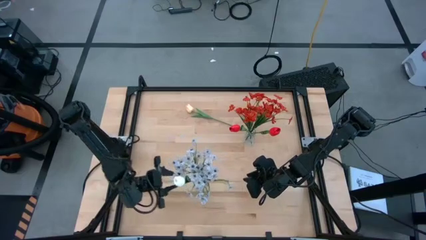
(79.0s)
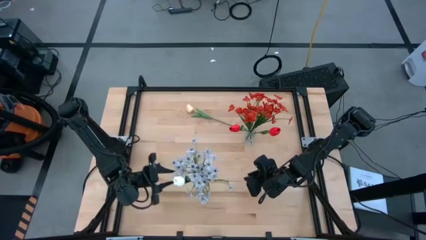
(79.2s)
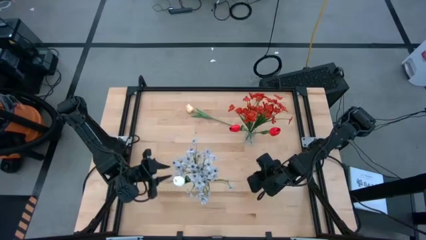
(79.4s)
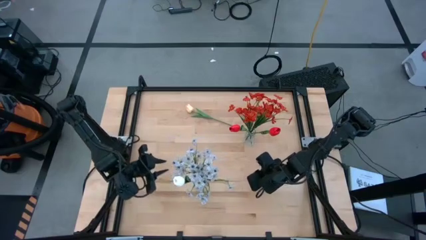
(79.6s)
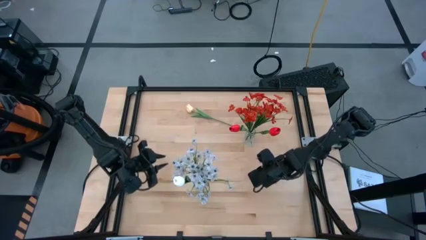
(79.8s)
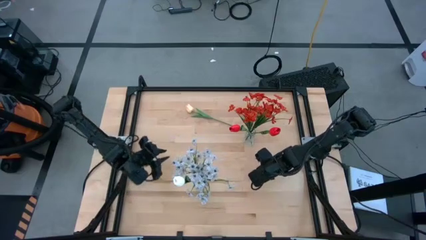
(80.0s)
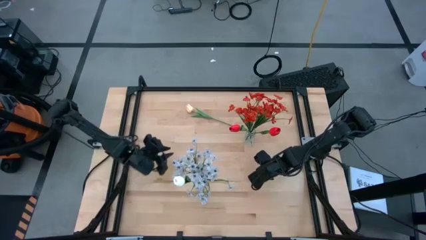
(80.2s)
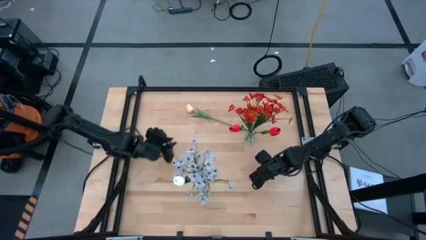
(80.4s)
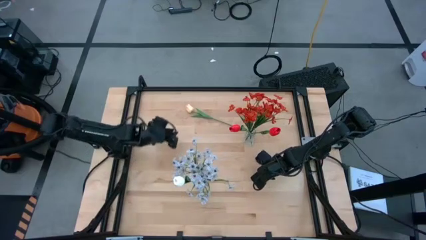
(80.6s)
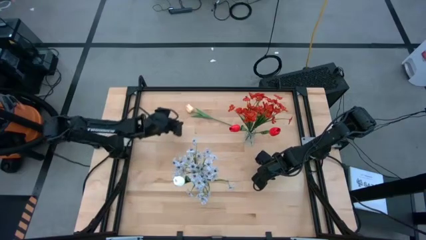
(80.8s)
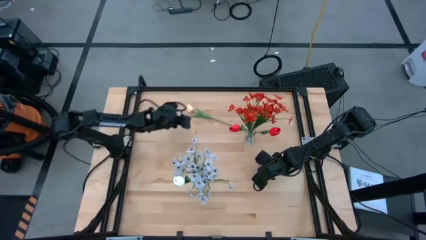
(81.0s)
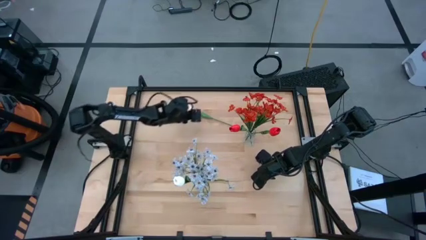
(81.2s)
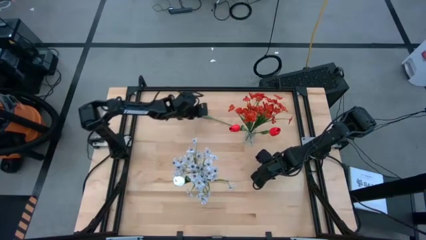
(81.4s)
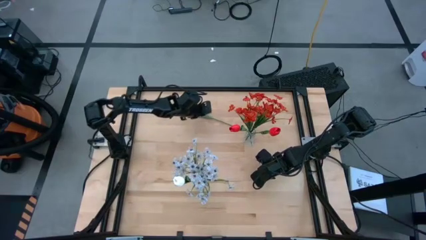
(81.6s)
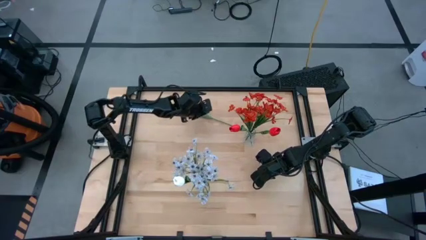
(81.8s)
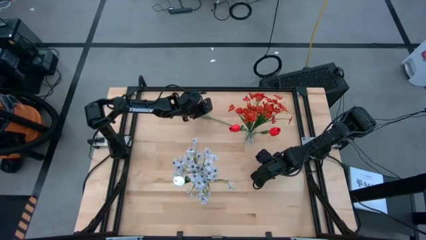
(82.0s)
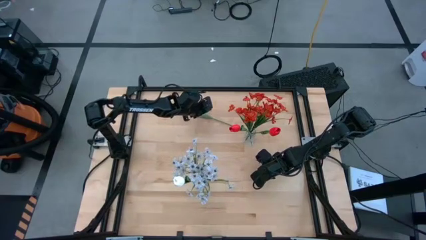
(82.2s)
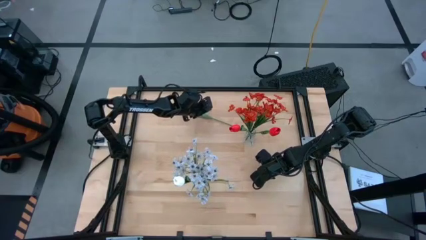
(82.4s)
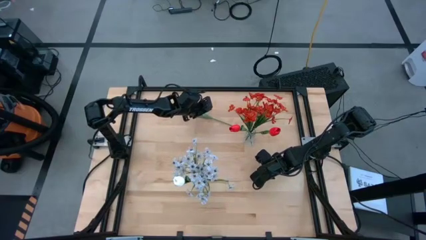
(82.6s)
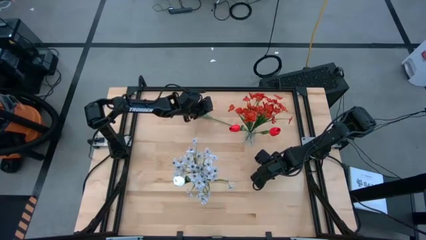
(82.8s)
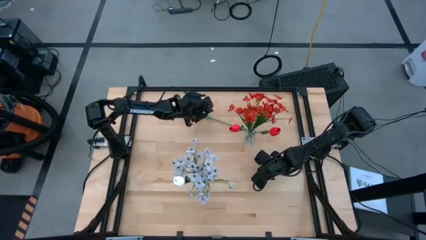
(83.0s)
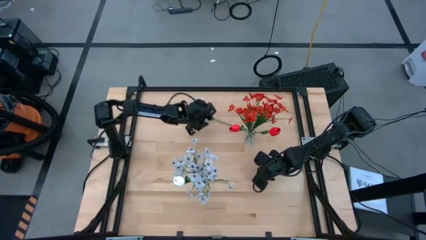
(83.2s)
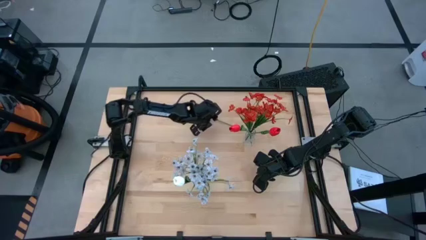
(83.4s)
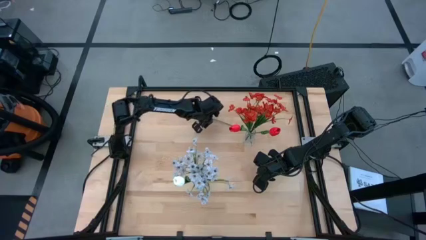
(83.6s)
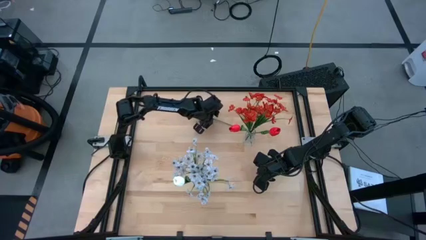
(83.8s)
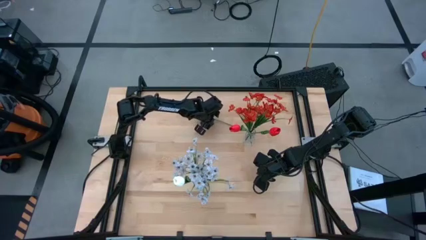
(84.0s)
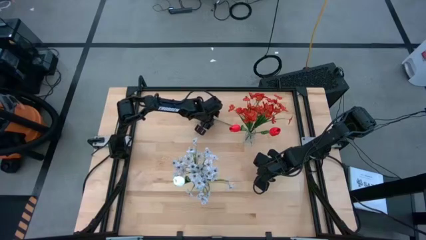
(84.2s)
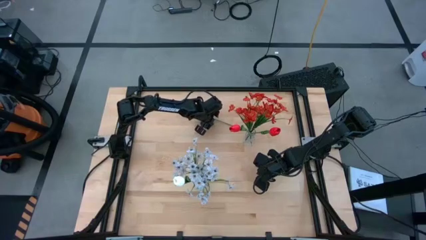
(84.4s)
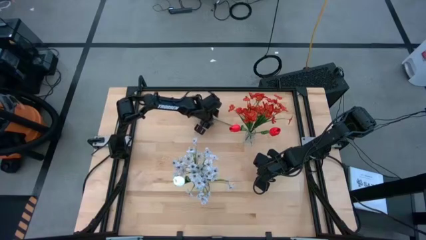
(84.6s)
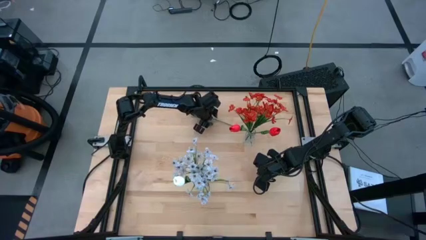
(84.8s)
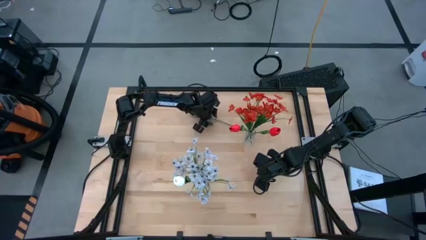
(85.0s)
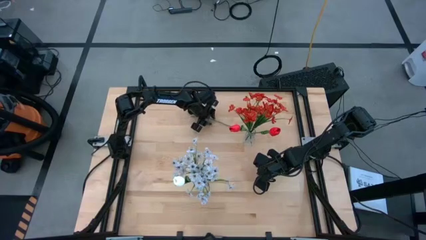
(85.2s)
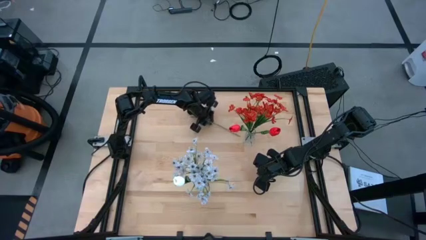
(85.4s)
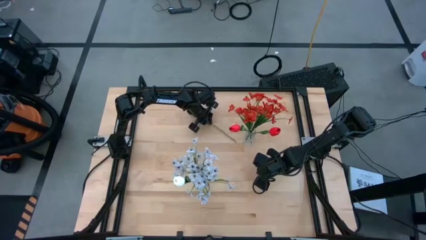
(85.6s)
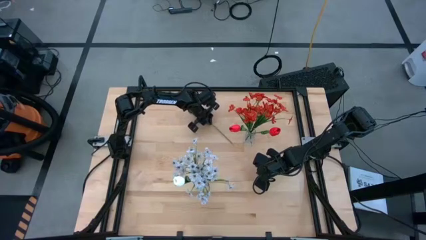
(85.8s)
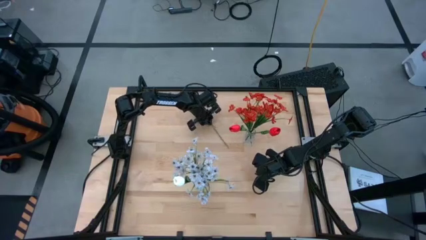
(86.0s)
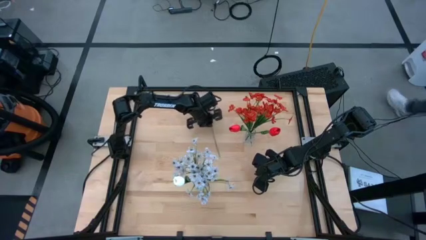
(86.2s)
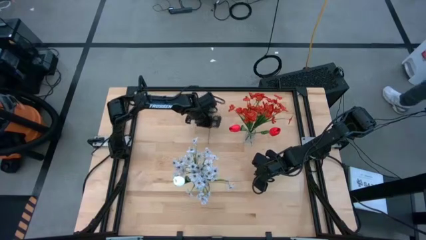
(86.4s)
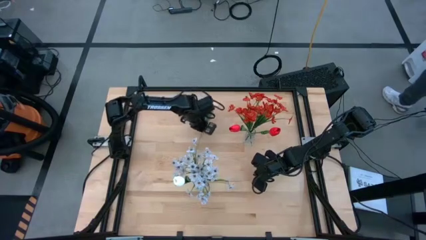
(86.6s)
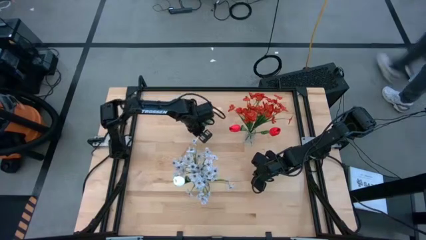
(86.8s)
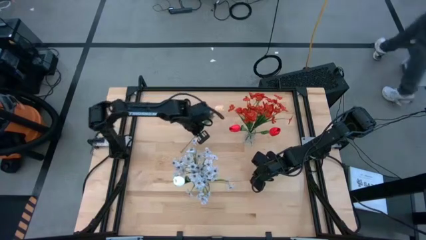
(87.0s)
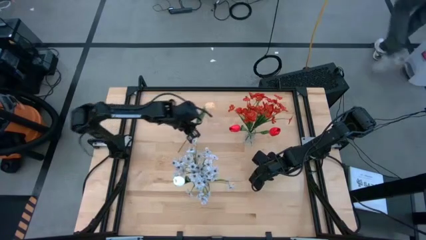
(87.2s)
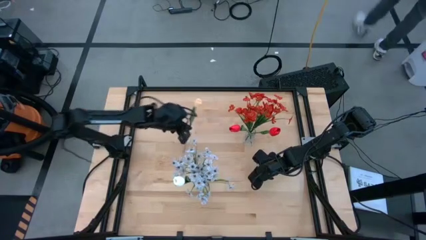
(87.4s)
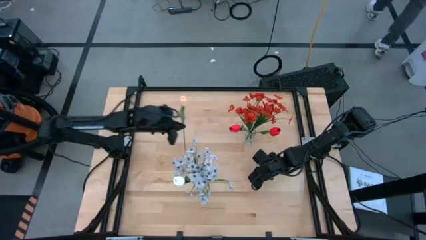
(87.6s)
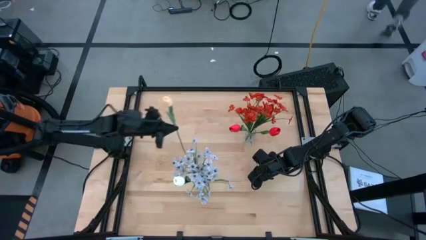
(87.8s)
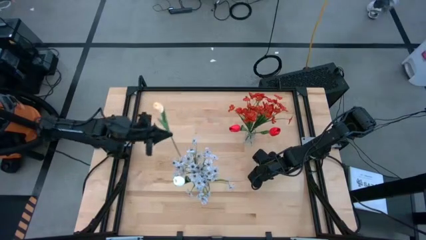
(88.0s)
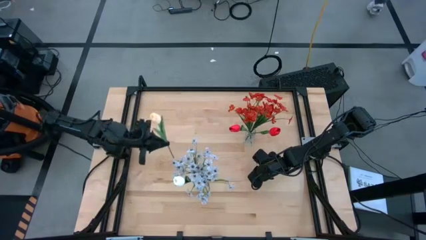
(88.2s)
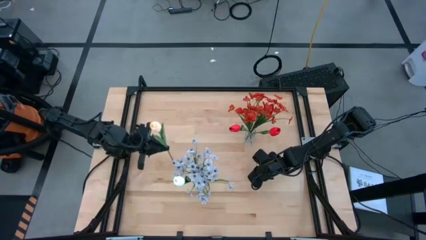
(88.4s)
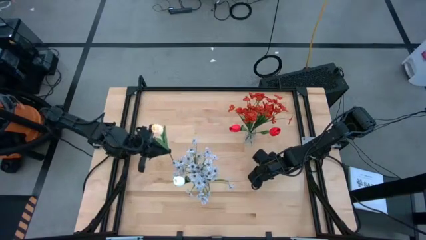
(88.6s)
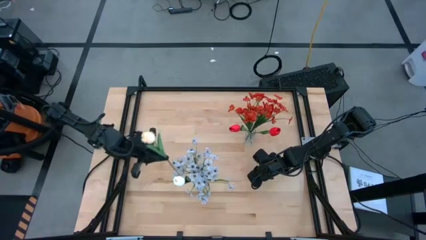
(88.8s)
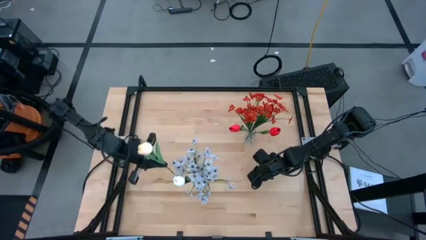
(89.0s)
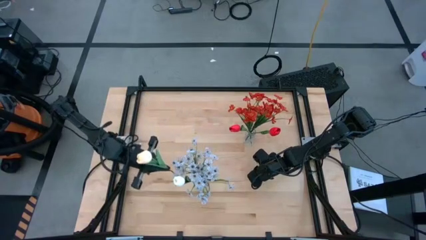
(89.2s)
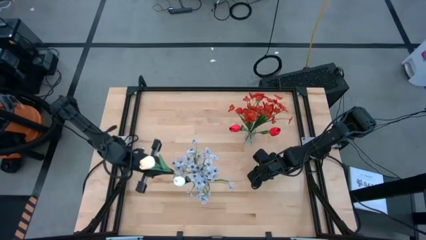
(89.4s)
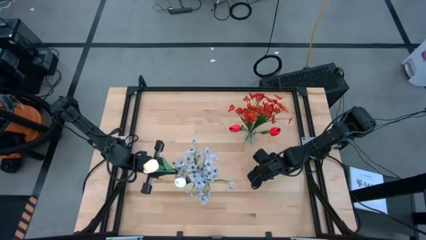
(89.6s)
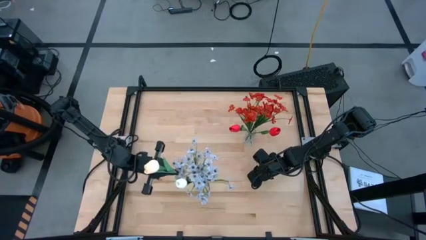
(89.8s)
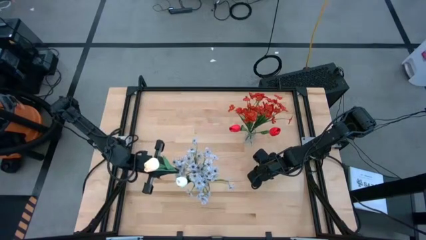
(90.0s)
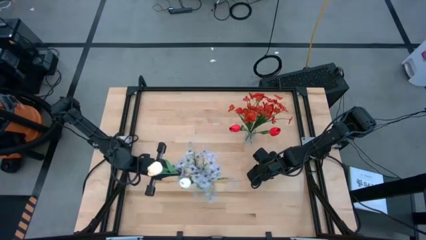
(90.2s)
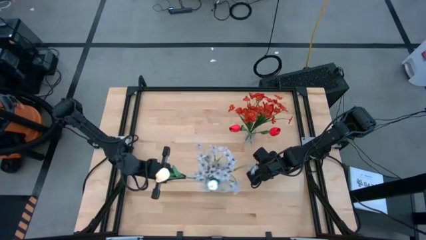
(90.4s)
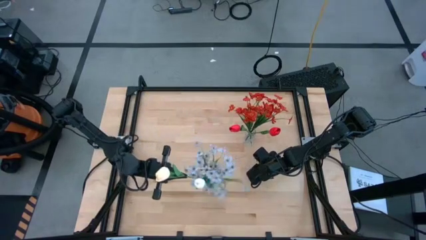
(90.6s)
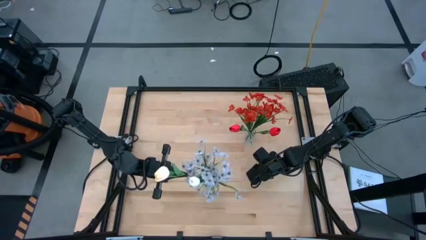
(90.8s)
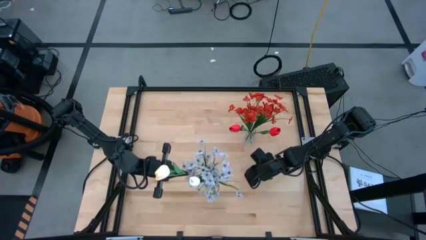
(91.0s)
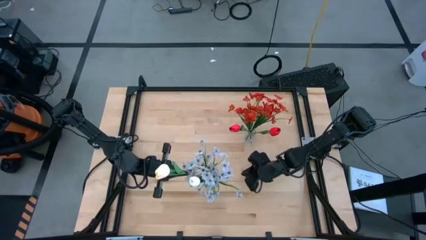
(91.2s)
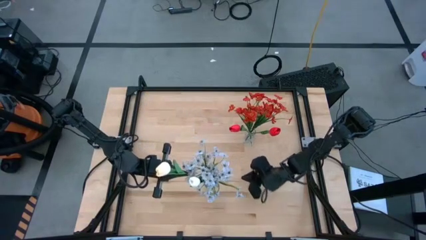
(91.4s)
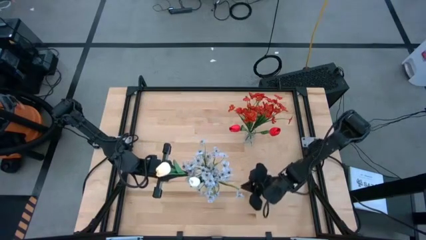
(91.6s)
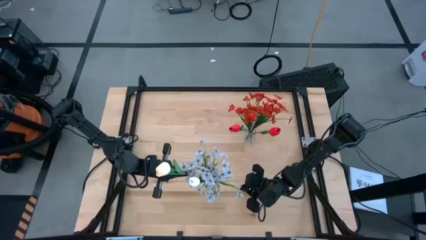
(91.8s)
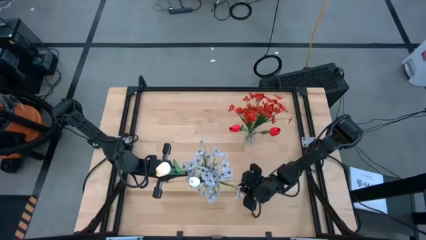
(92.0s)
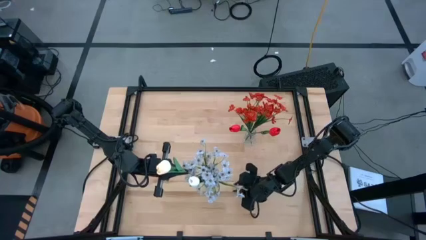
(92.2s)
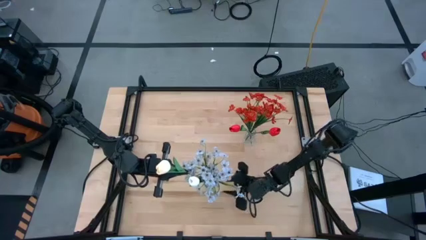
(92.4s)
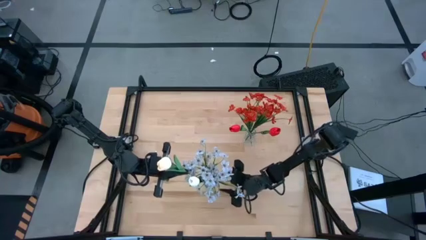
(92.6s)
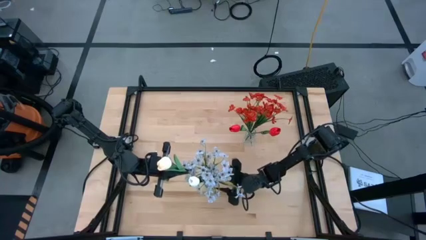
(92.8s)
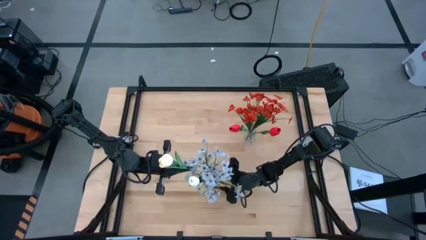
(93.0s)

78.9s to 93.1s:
Task: Sort flowers into vase by color
Put the yellow flower into the blue flower vase

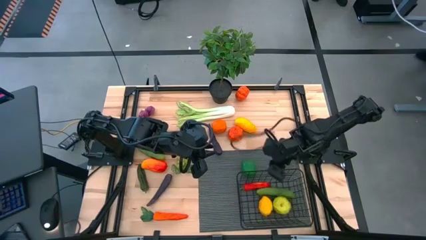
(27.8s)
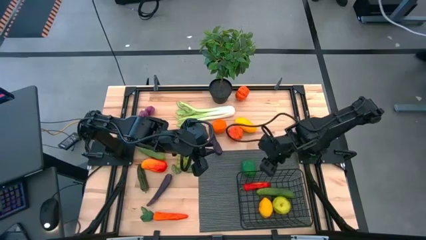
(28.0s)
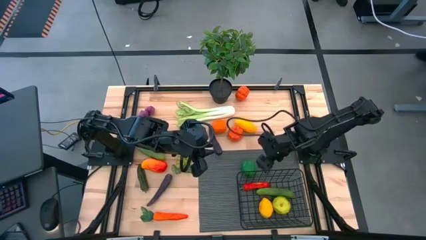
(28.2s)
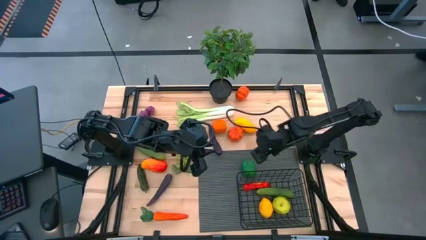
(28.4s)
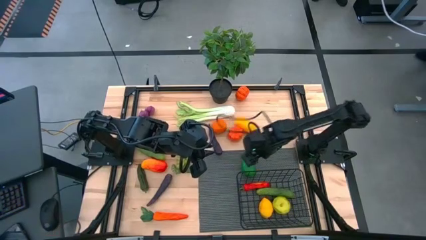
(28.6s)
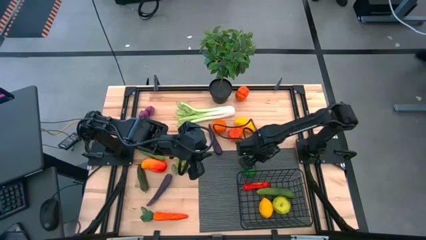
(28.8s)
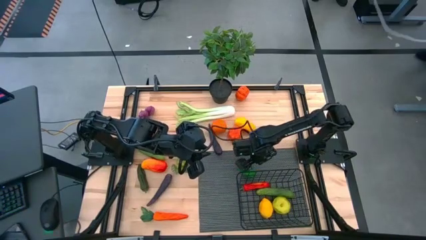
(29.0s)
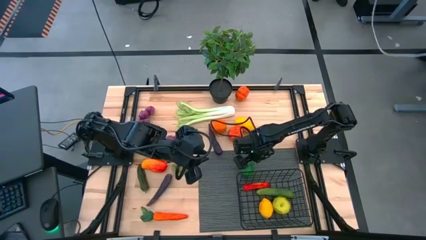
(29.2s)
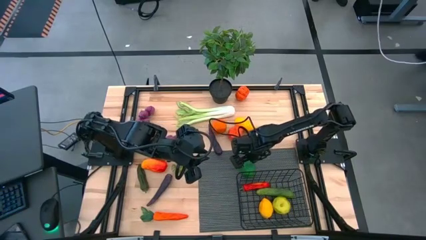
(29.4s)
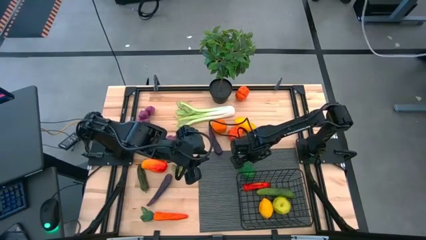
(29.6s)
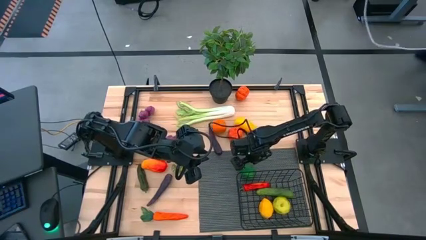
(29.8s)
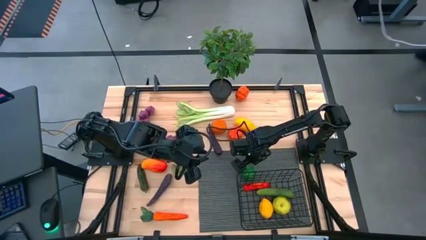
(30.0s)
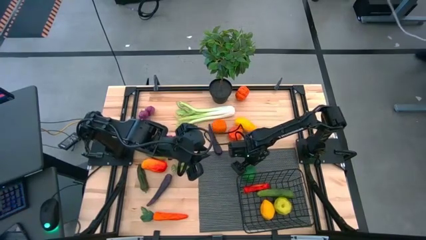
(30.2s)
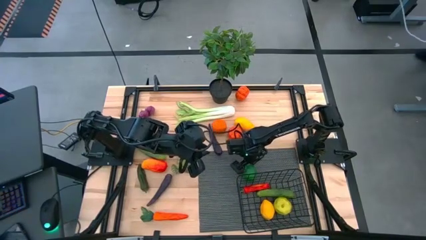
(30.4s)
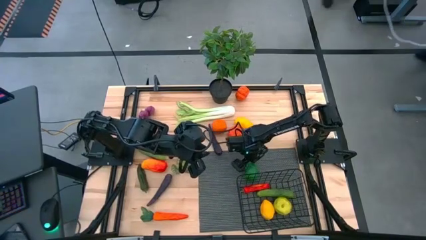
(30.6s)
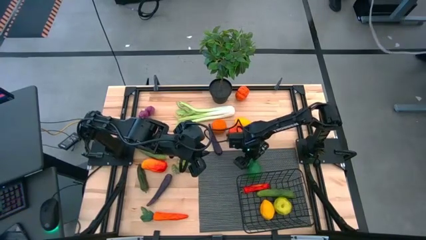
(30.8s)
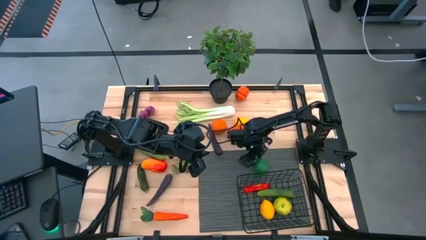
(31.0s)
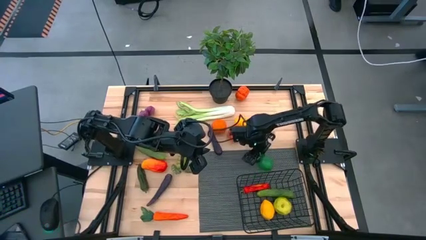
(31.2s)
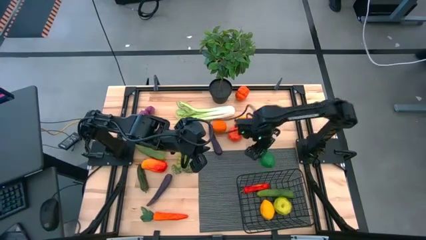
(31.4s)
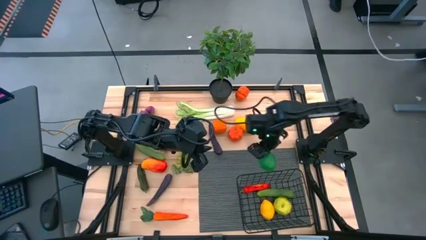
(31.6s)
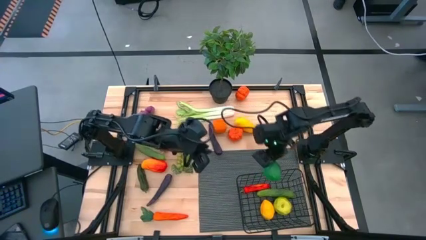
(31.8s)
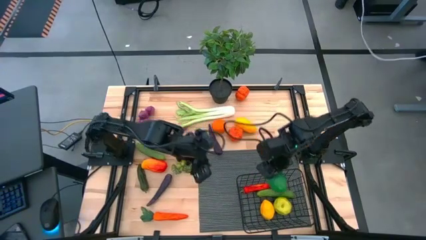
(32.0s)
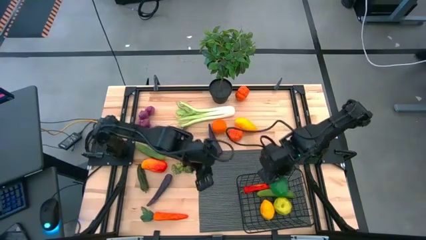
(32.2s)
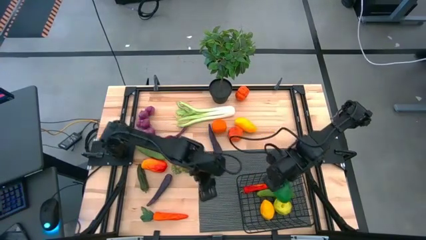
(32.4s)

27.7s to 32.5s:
Task: Build produce basket
Put the green lime into the black wire basket
